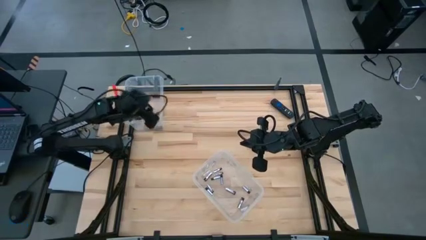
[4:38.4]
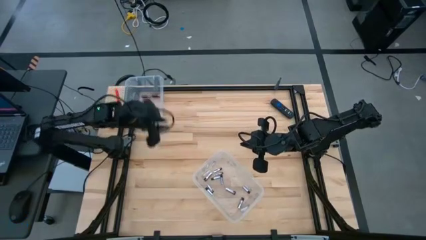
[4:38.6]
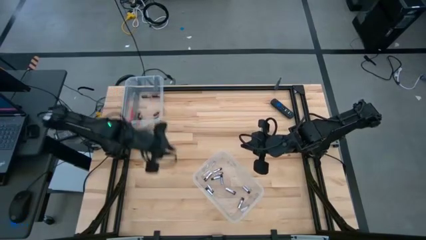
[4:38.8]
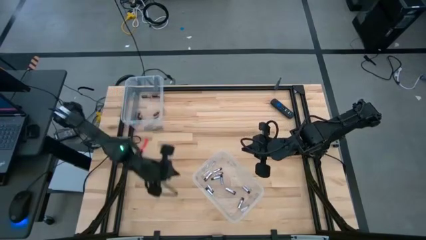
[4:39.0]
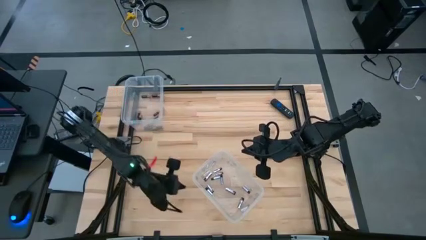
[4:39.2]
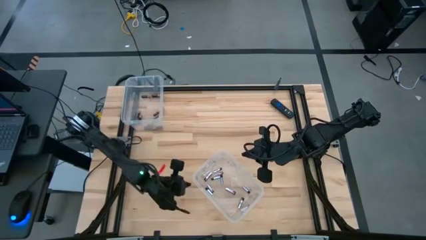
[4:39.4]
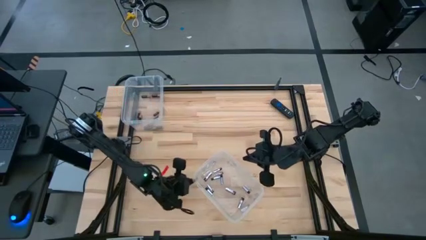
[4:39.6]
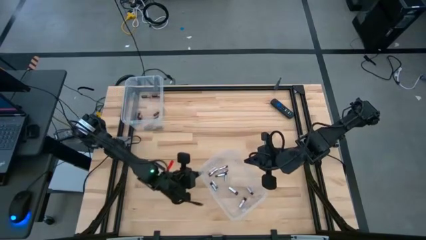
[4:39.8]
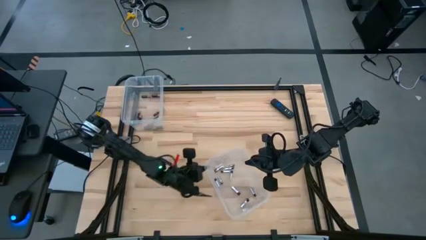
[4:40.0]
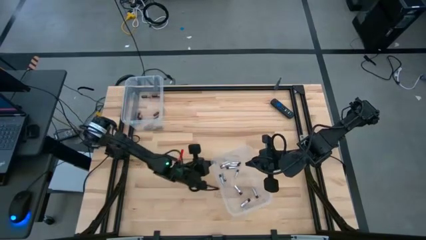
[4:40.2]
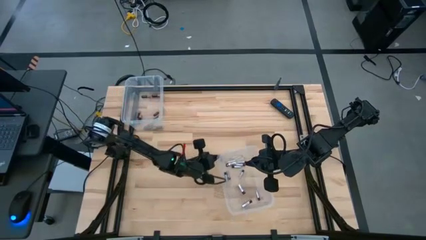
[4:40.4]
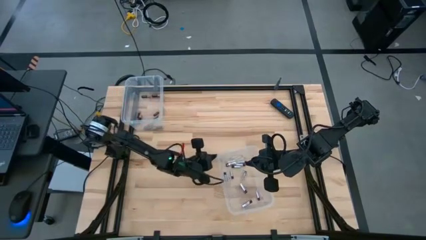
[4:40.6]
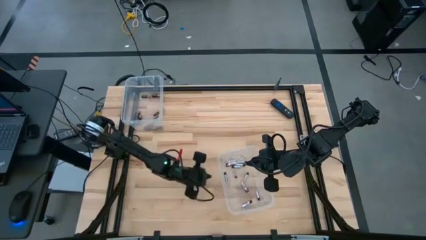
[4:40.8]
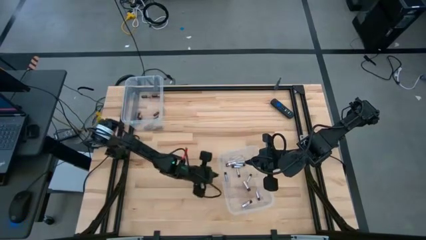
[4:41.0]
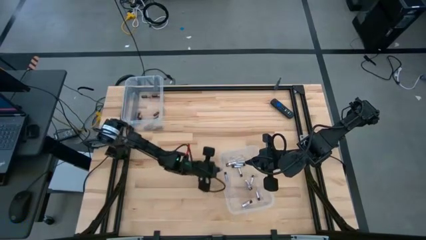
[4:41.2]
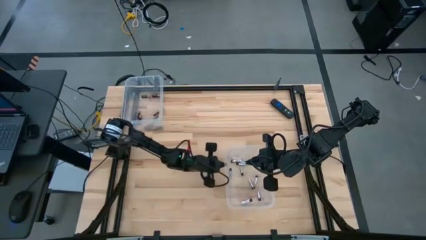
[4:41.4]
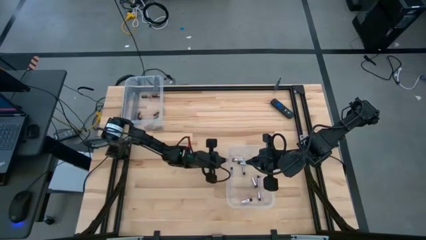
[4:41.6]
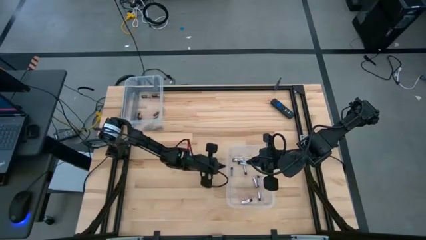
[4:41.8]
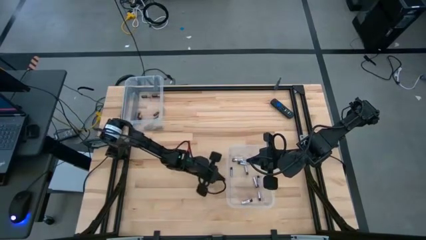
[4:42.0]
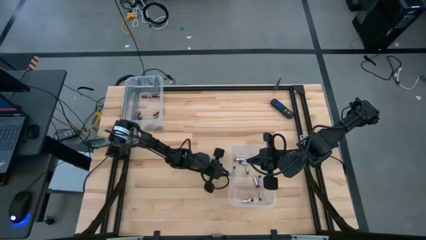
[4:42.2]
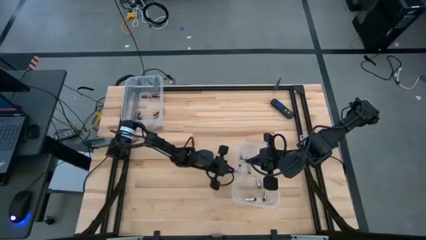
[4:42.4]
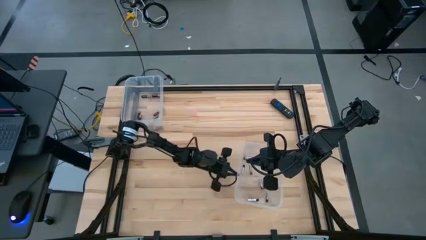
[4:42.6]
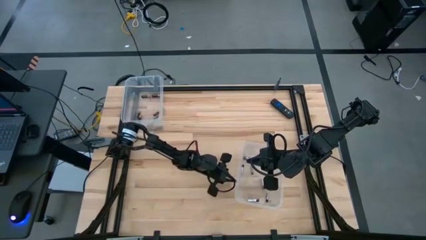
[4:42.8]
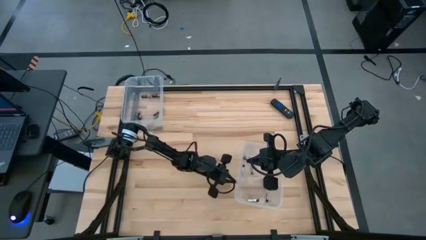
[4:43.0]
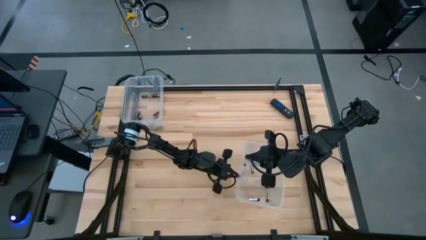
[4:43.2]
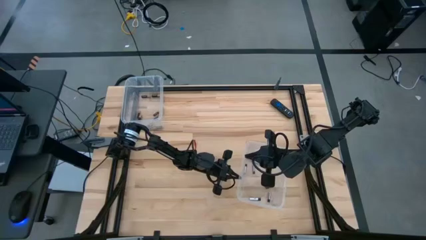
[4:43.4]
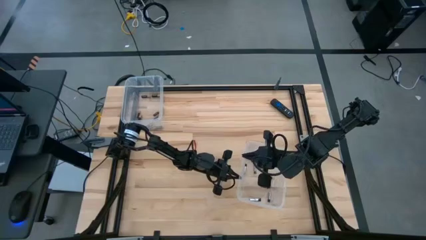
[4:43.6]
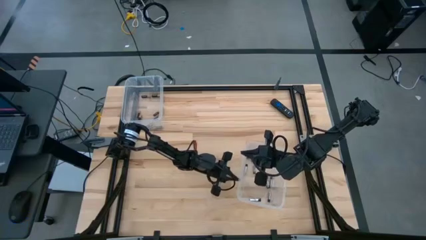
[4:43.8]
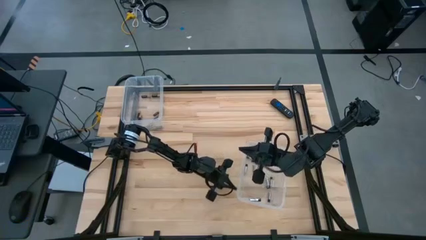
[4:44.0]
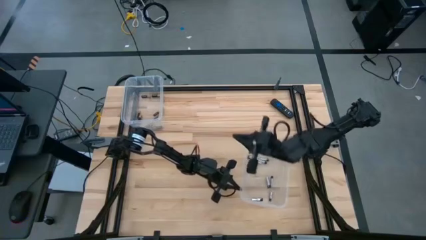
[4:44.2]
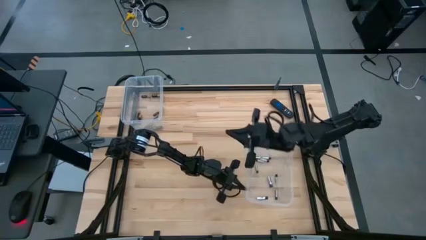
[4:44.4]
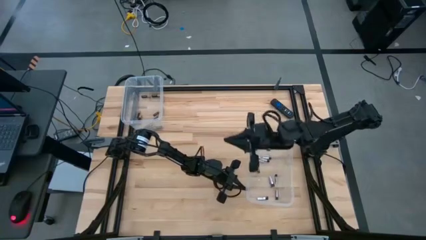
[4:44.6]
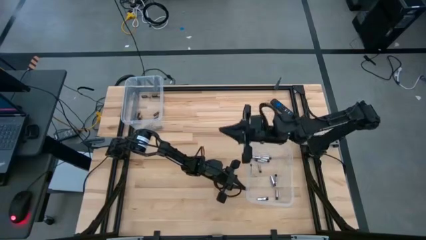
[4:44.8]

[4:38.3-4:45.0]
Task: Sort batteries
Move the bottom transparent bin to the bottom right of the table

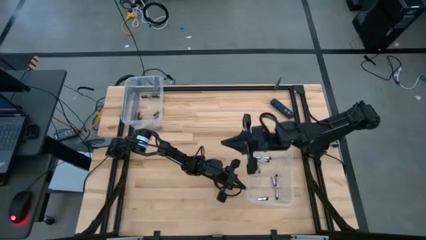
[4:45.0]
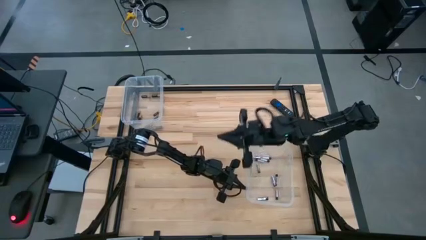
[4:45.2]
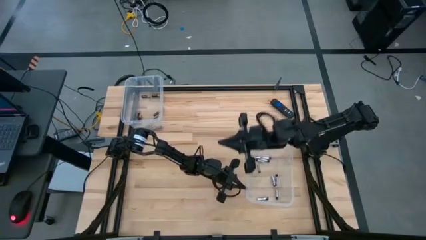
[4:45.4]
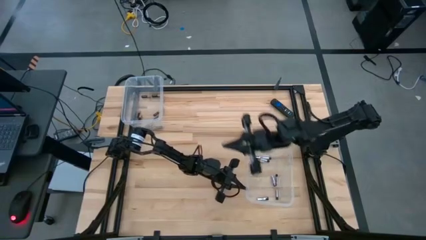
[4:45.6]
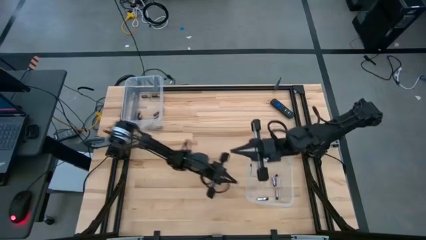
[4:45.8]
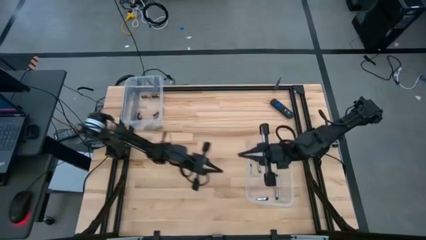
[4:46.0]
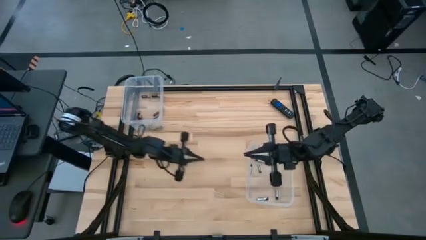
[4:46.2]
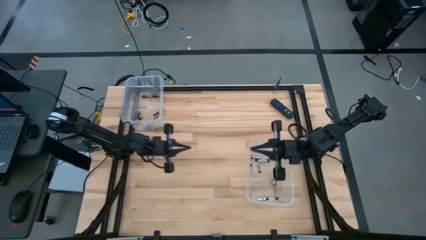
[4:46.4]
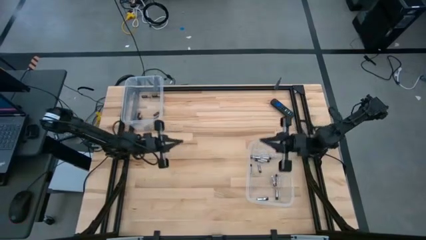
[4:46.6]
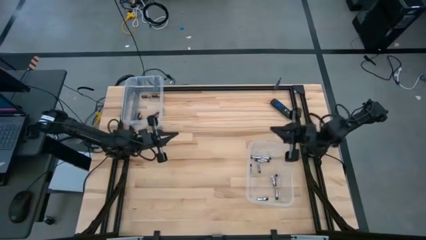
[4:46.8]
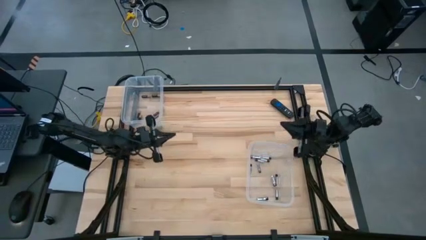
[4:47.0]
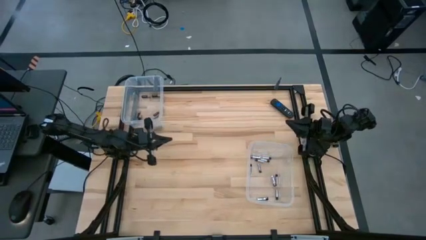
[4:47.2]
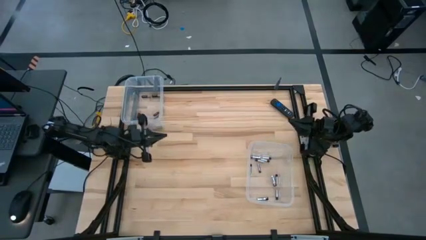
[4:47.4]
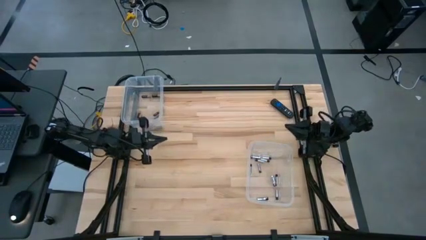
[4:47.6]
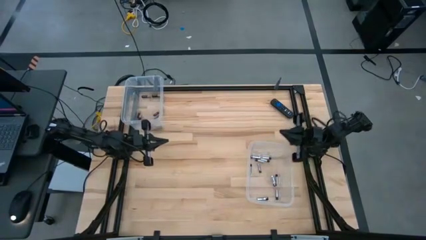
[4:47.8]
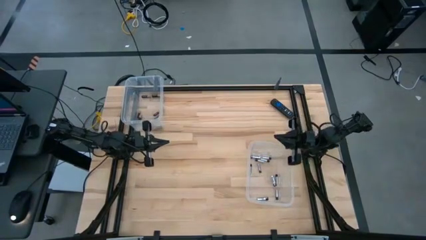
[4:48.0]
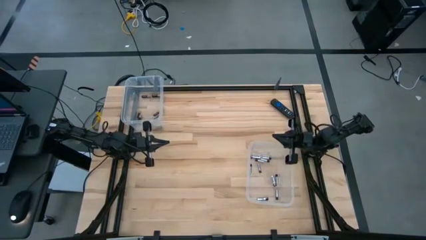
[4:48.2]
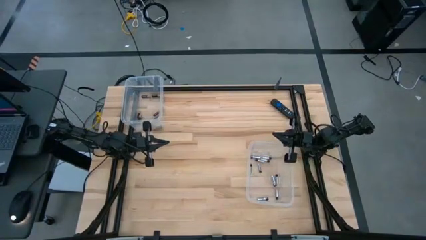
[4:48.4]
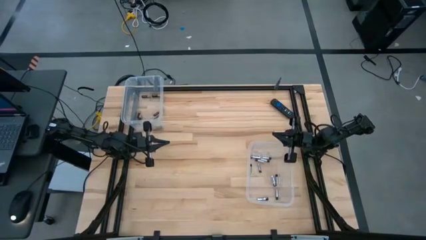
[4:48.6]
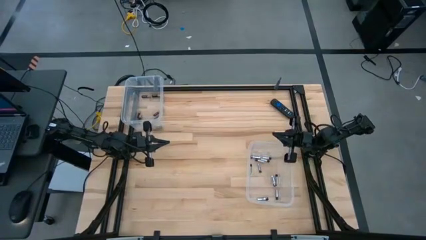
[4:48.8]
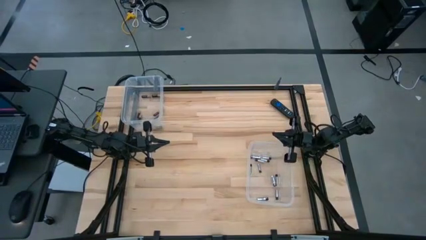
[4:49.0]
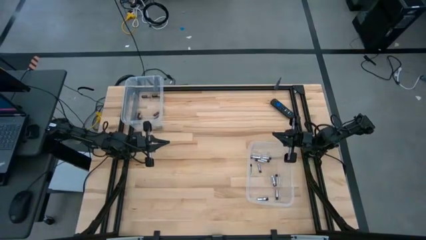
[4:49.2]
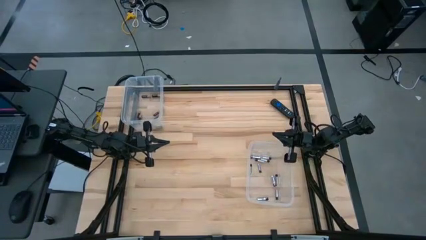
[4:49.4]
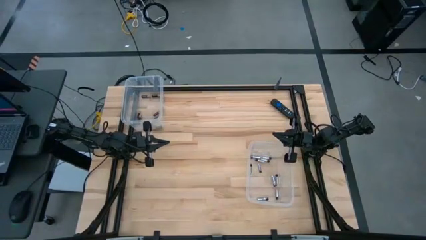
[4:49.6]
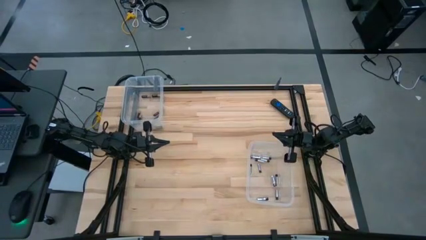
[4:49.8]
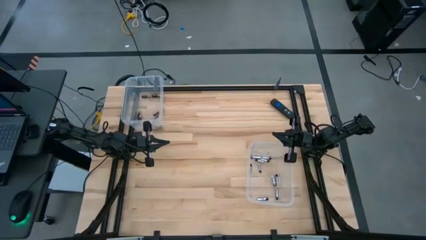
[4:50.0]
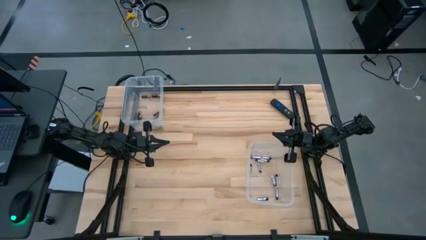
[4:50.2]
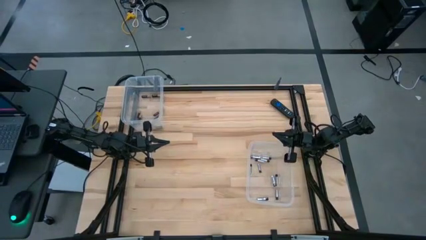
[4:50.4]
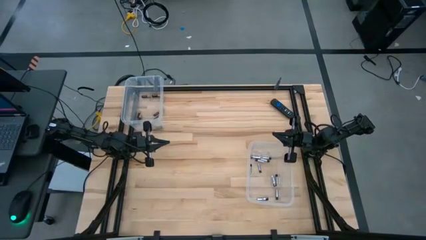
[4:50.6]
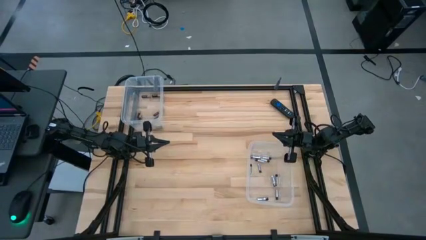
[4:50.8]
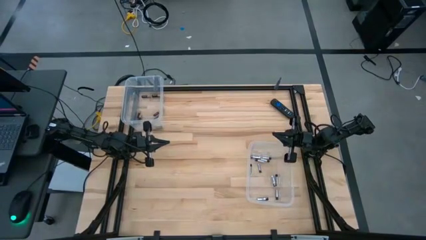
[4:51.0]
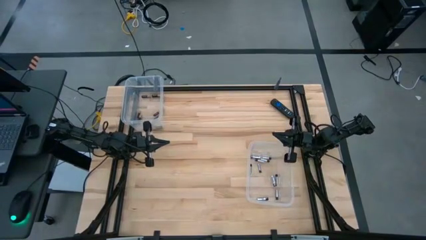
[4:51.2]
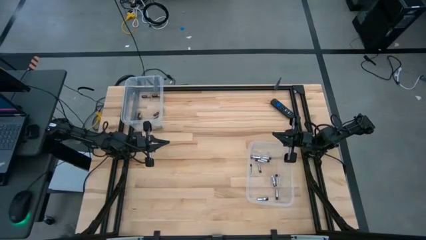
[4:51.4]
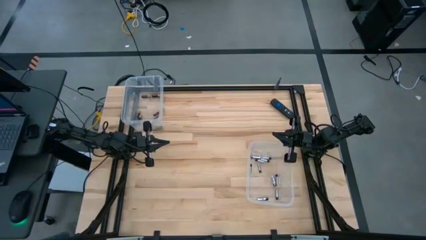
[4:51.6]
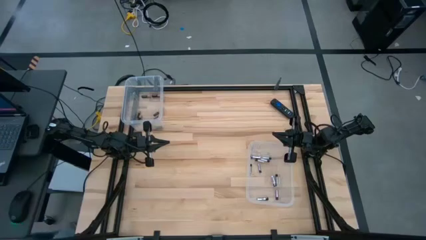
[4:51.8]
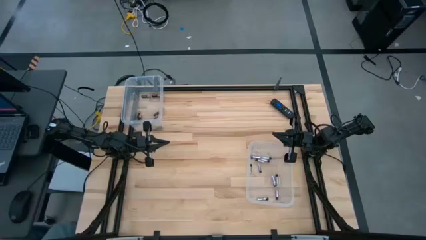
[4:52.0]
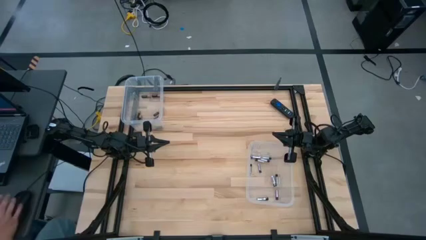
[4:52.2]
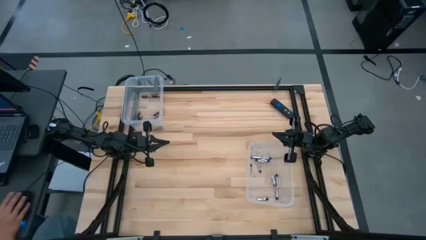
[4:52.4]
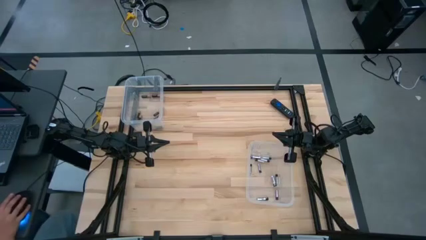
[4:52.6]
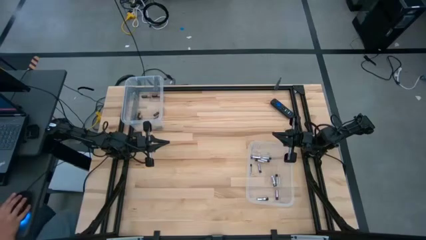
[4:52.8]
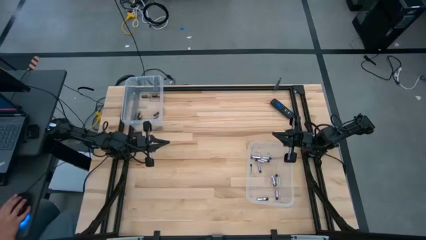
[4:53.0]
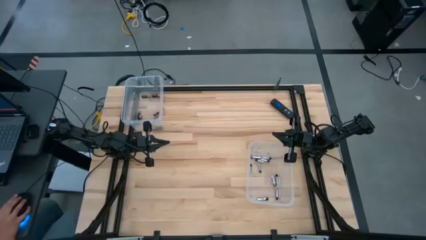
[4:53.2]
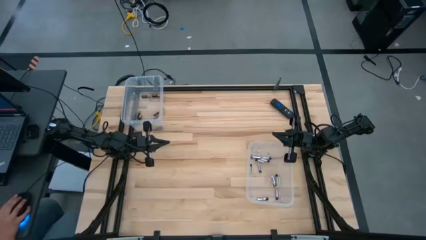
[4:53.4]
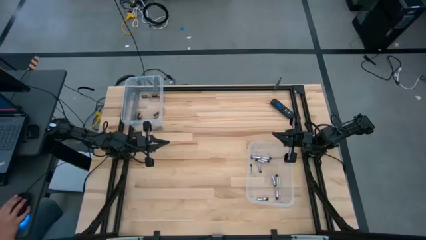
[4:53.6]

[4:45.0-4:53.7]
Return to Home Position
